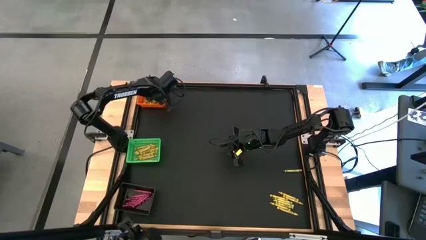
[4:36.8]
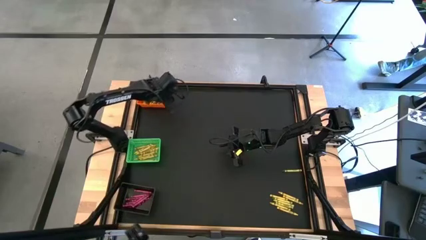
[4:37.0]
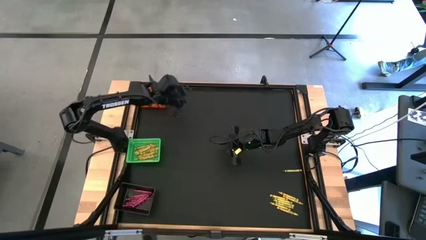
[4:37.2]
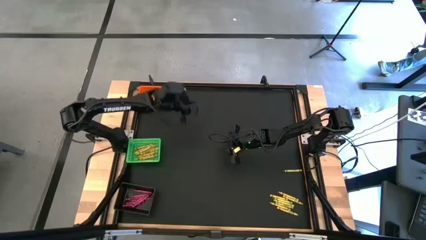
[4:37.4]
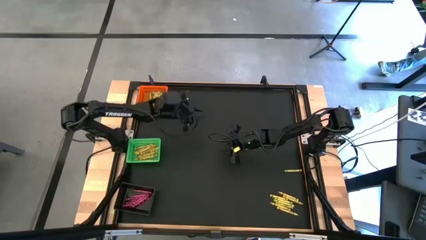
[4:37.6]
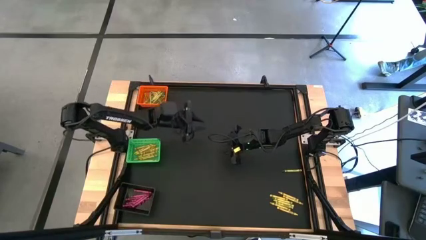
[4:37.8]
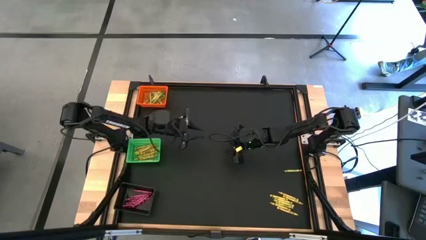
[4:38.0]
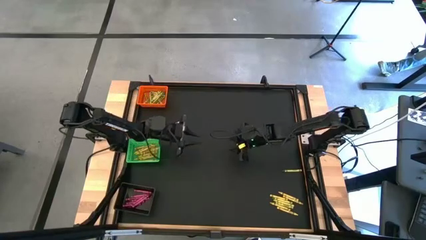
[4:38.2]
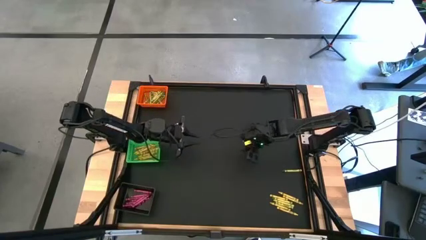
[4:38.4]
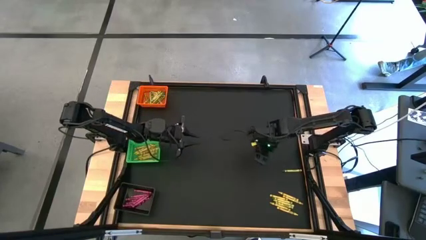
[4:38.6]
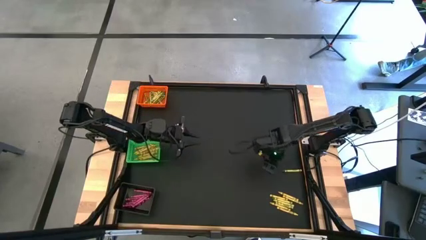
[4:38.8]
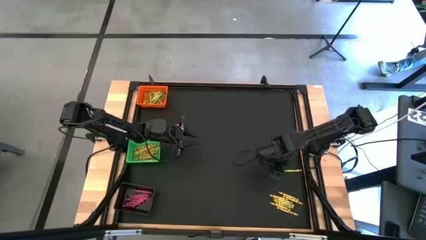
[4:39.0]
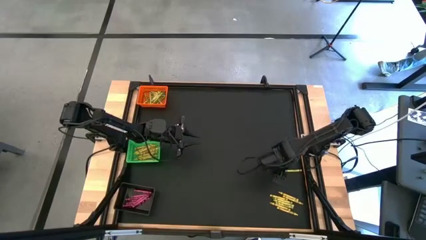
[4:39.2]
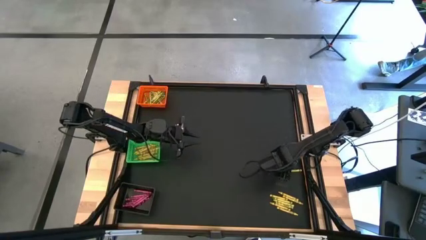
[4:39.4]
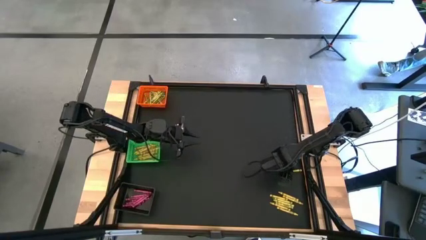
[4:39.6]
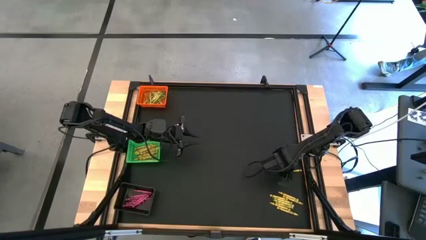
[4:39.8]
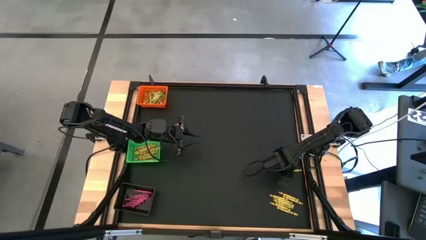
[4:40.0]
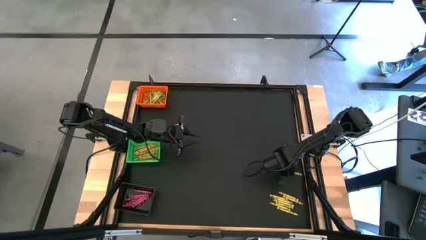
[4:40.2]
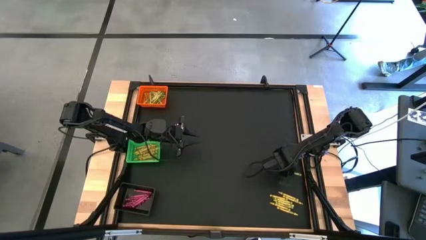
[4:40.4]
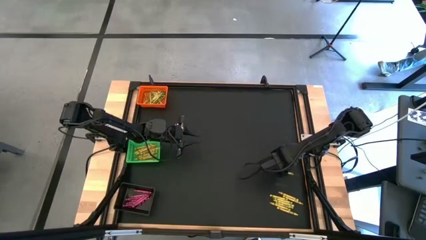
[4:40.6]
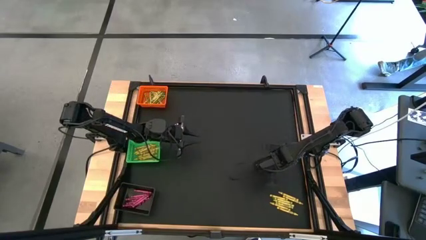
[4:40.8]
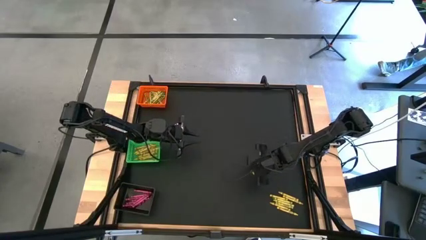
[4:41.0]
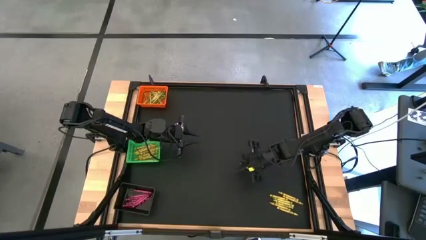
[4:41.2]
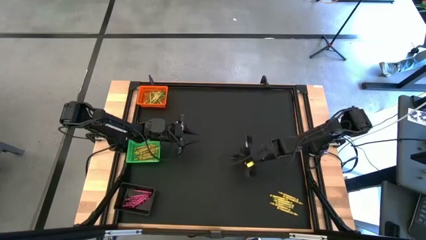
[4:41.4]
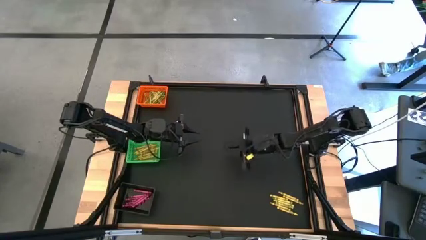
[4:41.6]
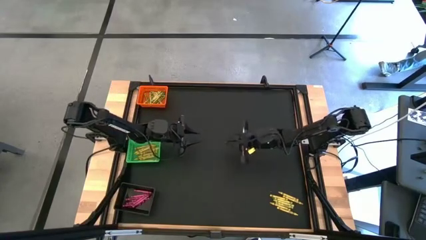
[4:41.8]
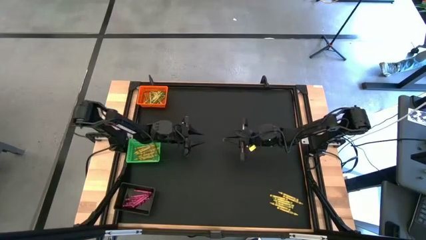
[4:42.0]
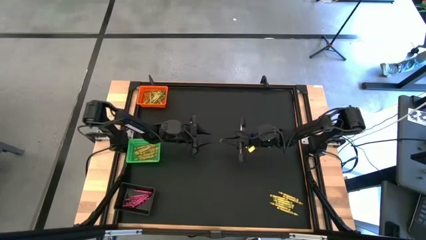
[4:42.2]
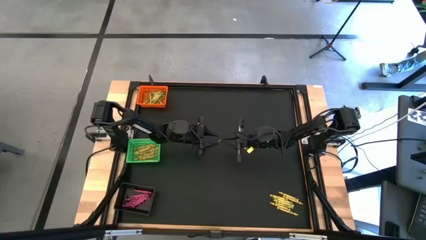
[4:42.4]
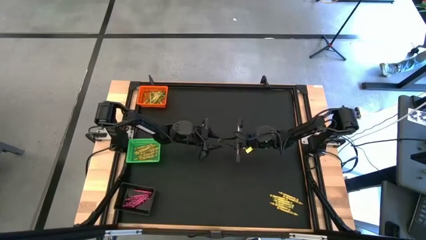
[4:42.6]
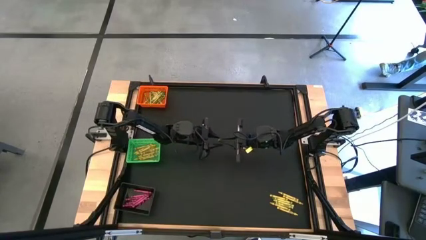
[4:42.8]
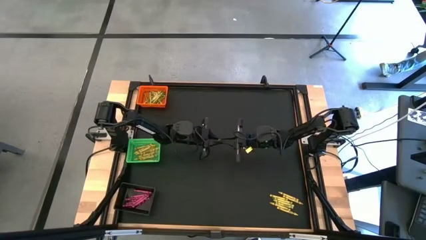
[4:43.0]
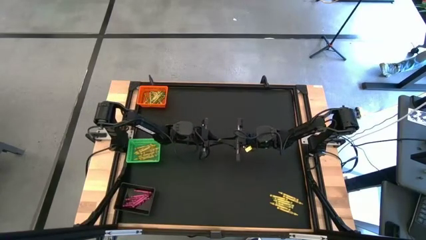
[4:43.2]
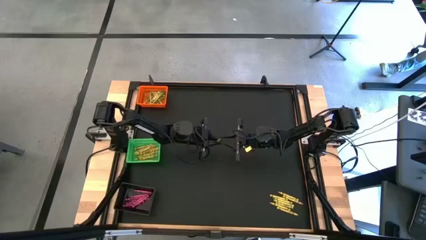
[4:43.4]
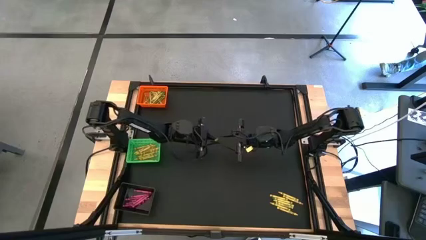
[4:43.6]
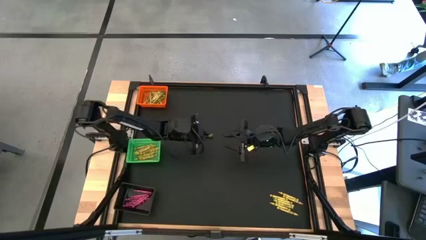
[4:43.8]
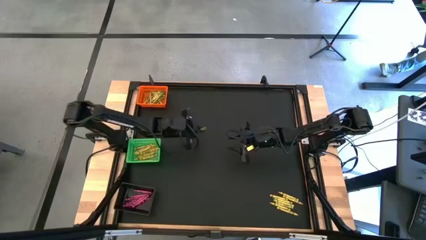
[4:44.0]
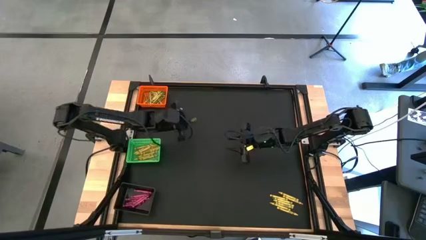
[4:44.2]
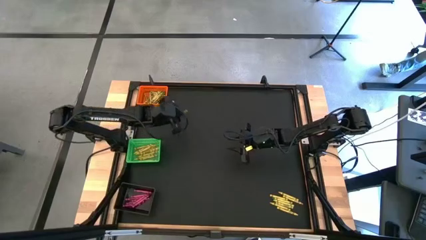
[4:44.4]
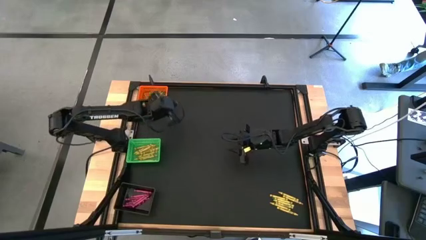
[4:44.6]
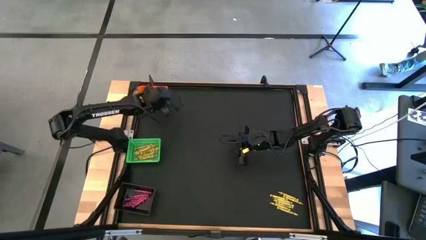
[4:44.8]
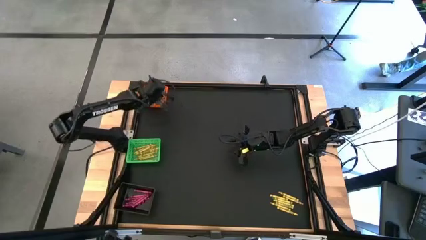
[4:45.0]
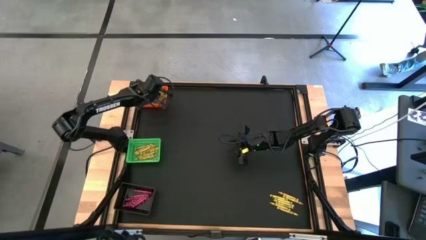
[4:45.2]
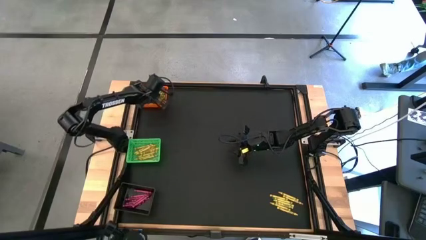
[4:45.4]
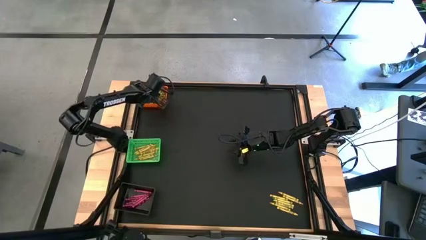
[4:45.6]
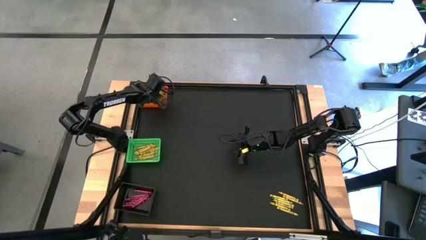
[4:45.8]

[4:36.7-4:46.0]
Task: Sort crayons
Put the green crayon into the orange bin

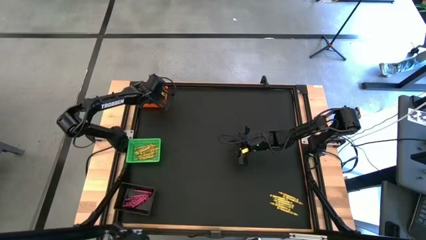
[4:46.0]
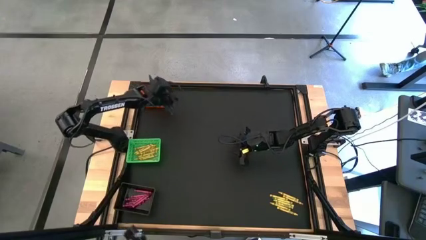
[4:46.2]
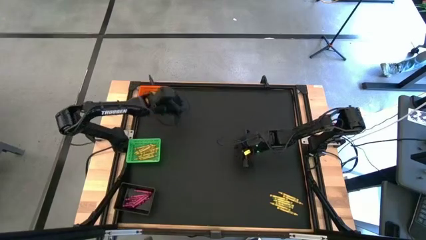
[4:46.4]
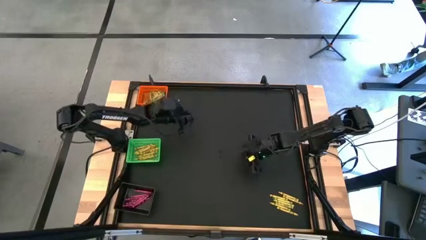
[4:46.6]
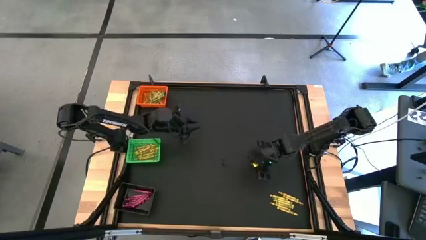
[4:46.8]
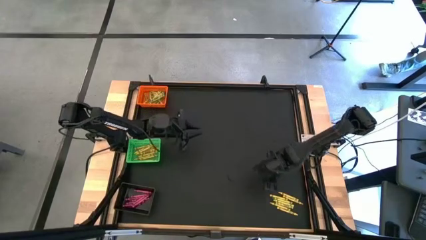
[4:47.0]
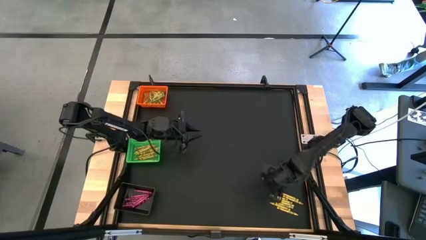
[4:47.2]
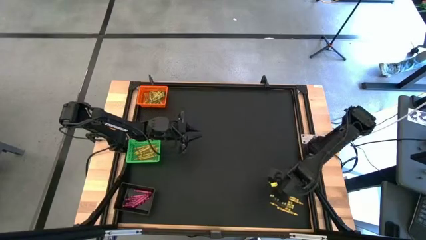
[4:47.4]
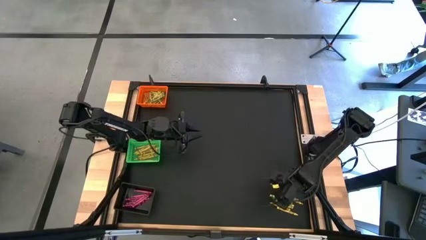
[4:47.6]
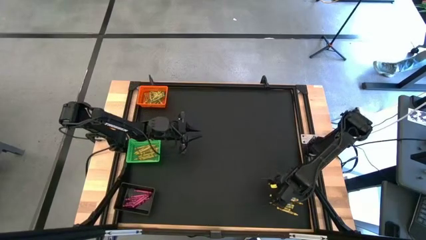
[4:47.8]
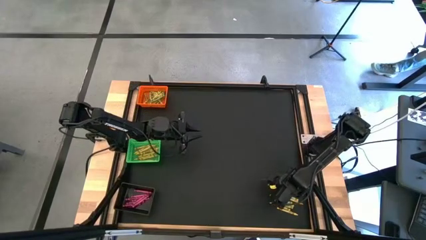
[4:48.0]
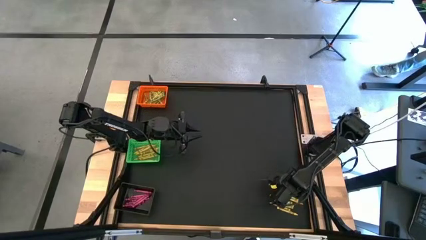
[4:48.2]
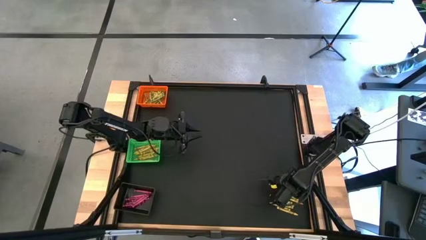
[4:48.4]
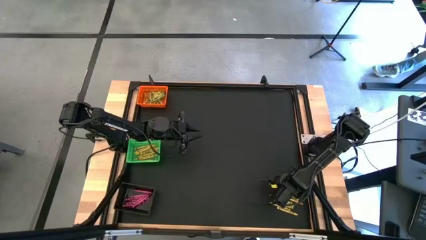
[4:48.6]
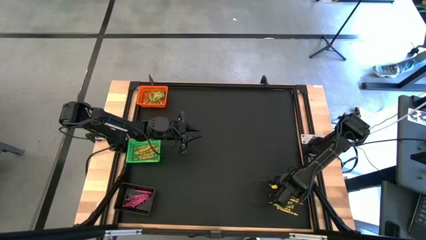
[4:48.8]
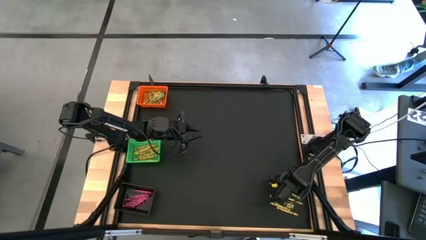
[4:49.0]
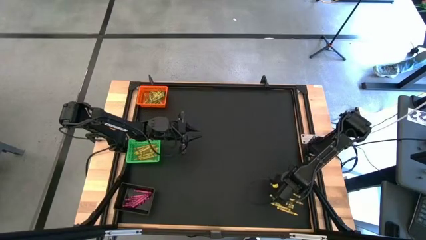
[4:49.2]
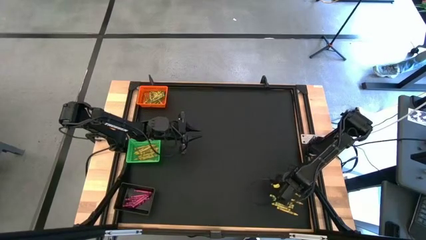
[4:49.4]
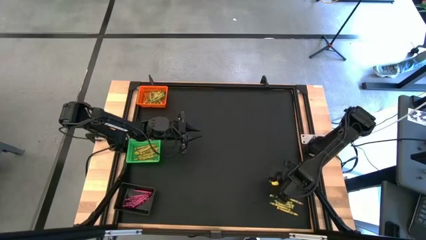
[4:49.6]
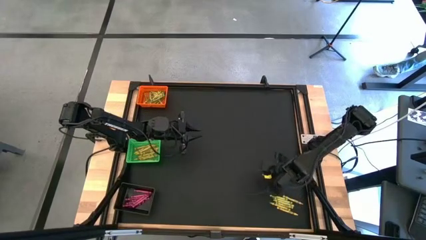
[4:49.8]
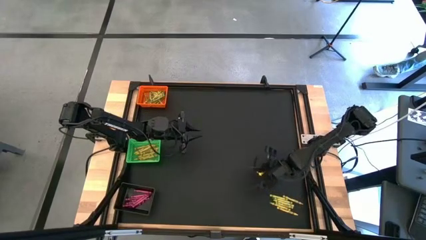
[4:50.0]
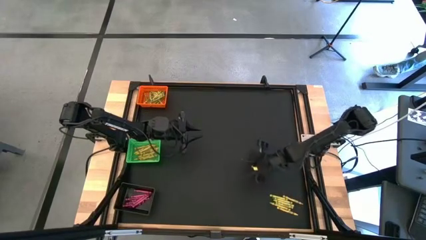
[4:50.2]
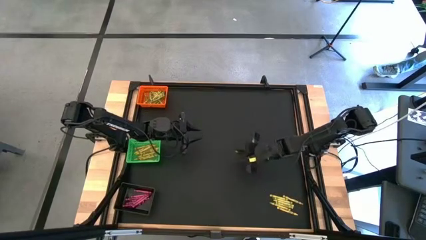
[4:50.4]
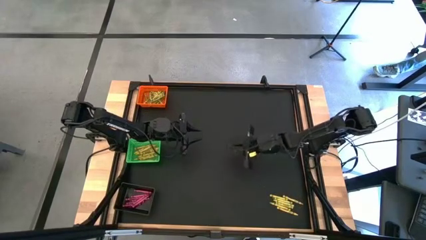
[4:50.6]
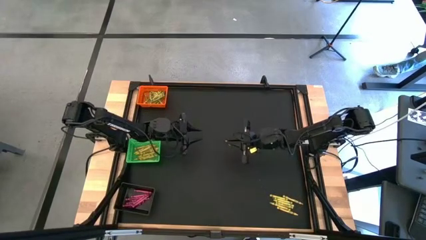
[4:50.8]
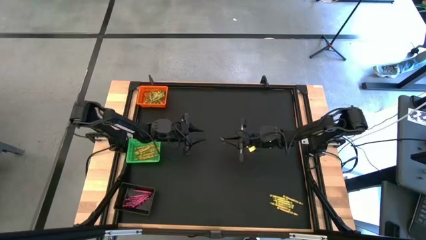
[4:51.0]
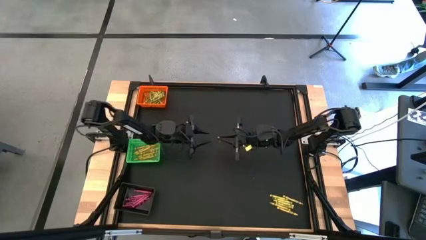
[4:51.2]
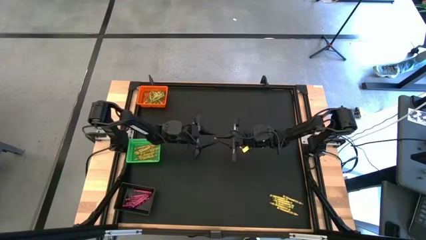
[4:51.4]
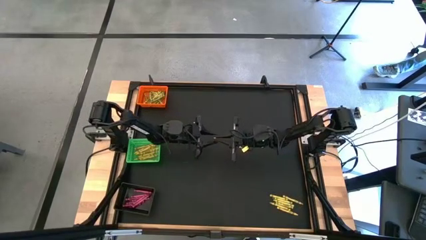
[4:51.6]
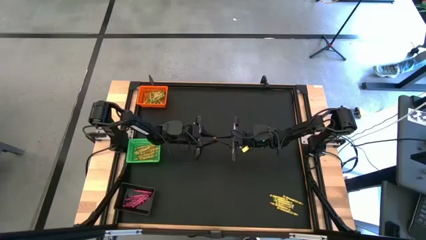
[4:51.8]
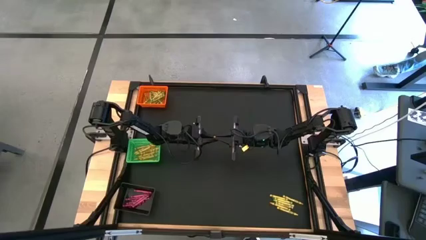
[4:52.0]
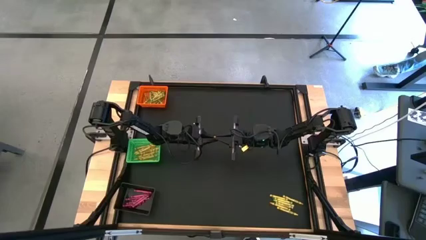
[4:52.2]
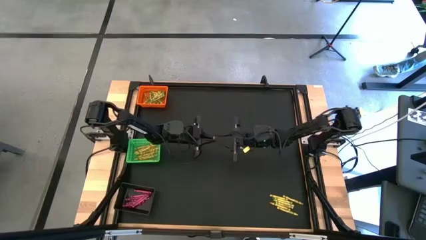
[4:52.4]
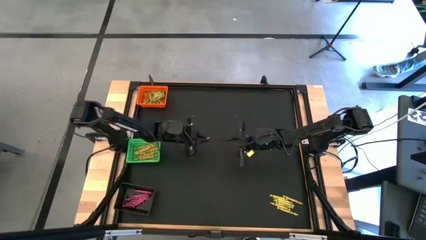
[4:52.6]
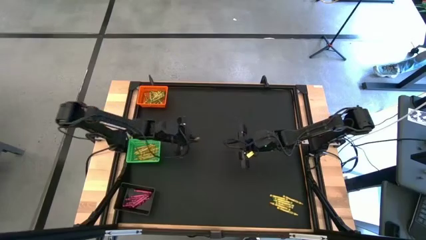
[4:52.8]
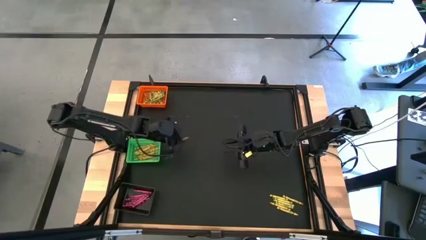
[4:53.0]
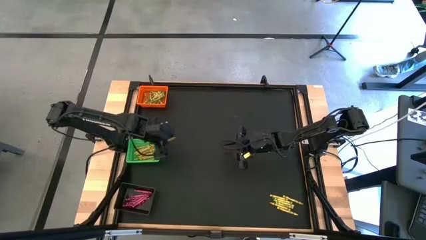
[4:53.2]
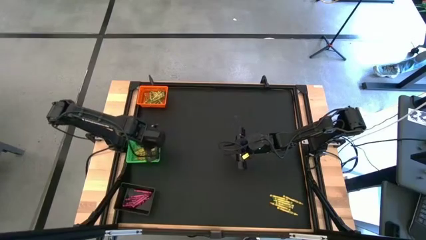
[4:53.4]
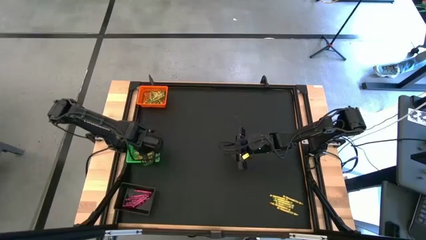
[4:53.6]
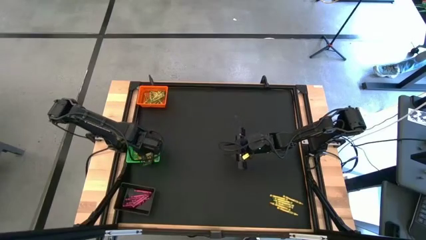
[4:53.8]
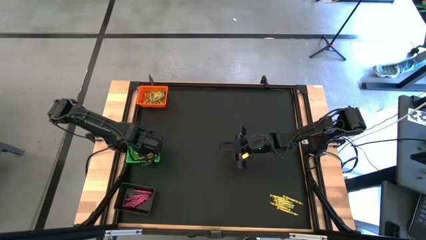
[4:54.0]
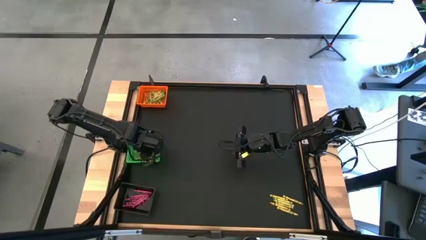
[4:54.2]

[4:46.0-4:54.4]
Put the yellow crayon into the green bin
